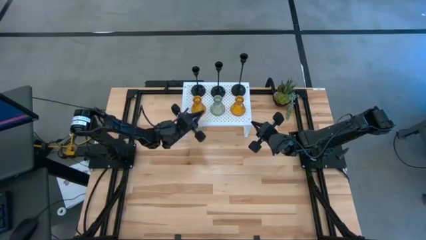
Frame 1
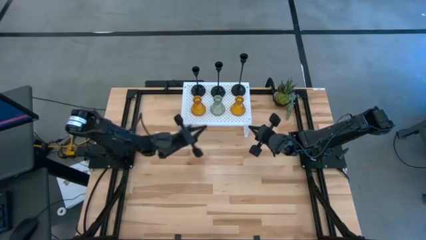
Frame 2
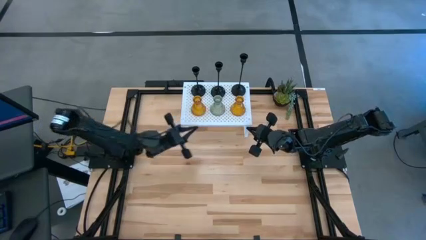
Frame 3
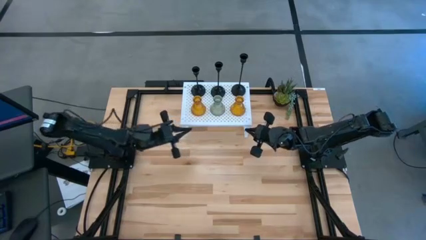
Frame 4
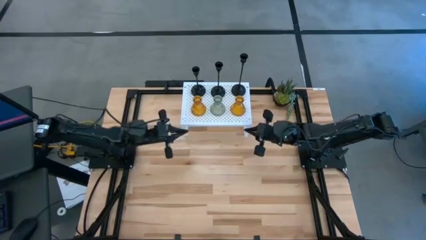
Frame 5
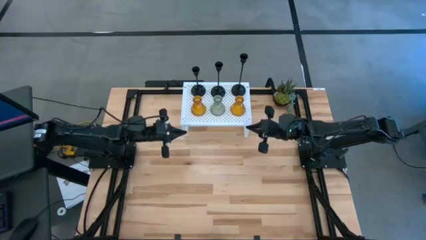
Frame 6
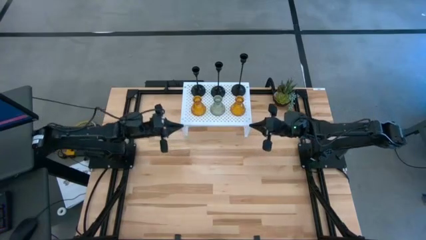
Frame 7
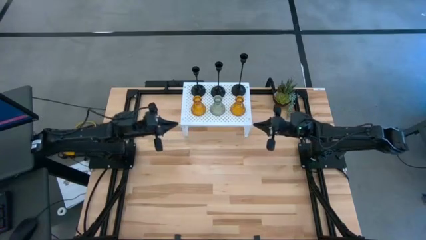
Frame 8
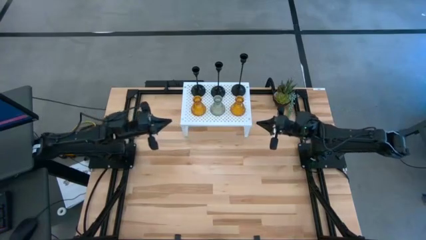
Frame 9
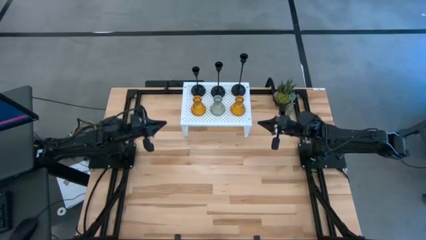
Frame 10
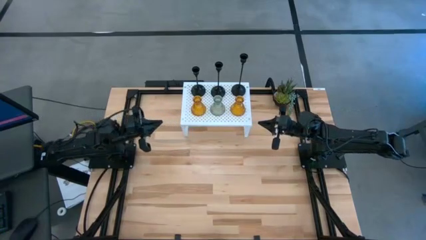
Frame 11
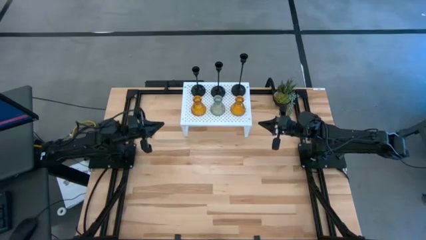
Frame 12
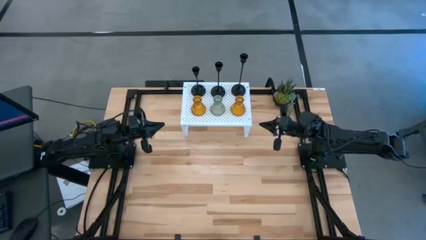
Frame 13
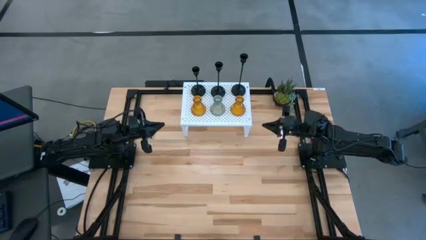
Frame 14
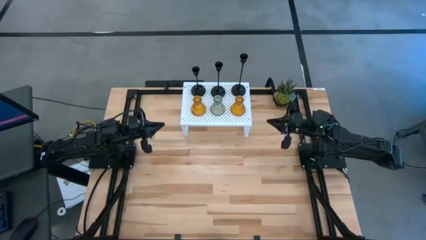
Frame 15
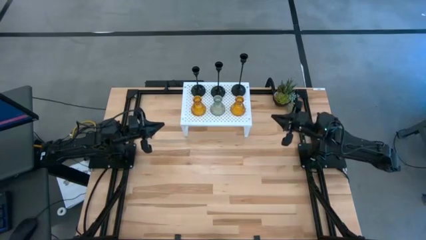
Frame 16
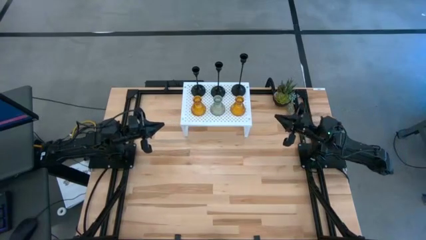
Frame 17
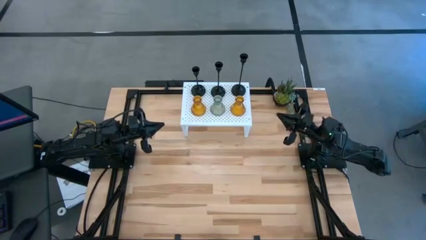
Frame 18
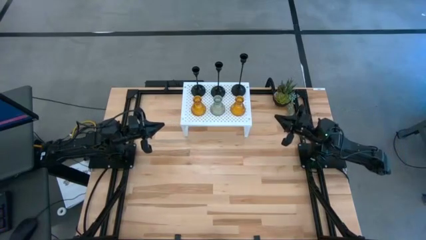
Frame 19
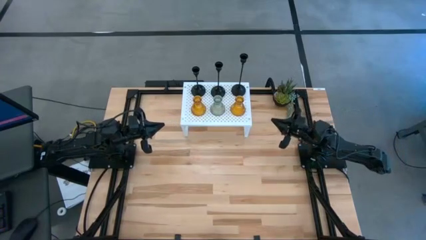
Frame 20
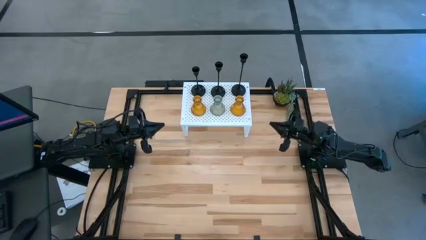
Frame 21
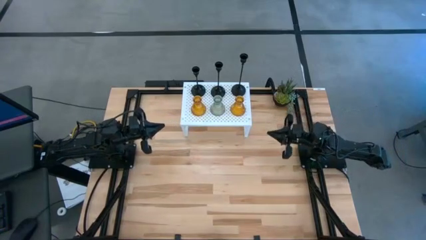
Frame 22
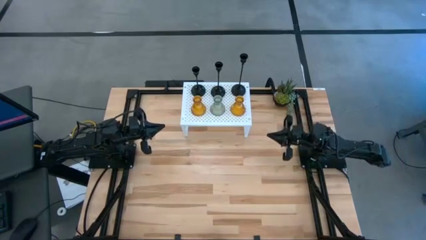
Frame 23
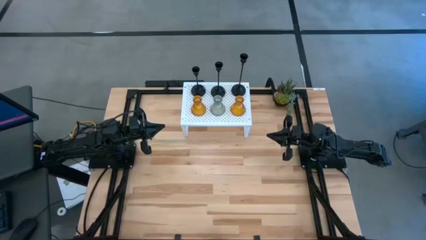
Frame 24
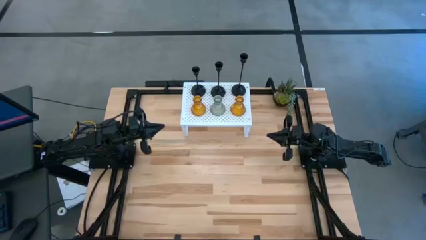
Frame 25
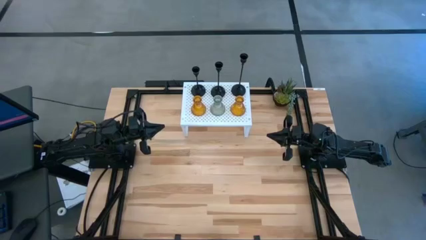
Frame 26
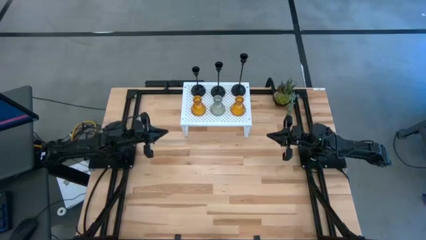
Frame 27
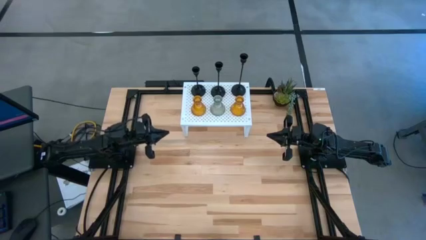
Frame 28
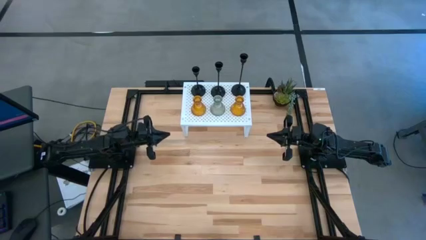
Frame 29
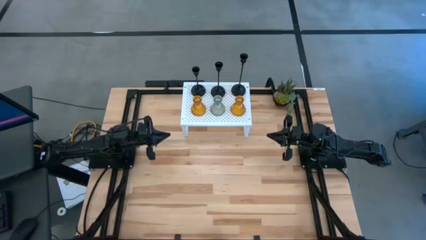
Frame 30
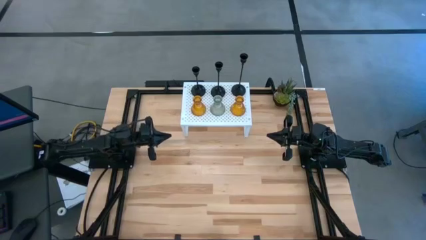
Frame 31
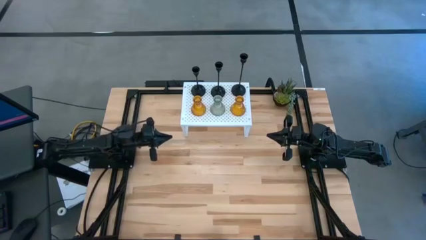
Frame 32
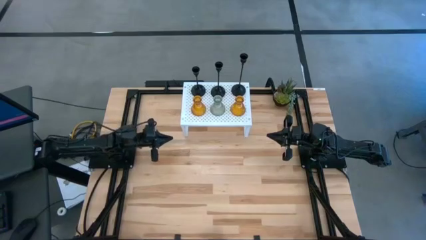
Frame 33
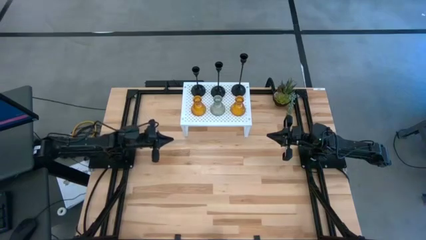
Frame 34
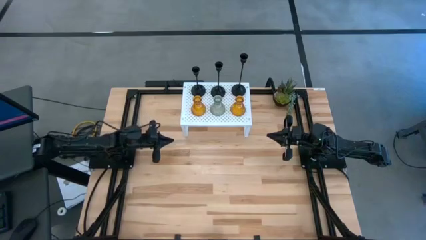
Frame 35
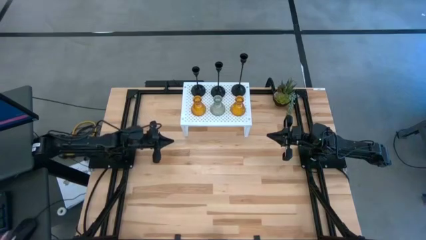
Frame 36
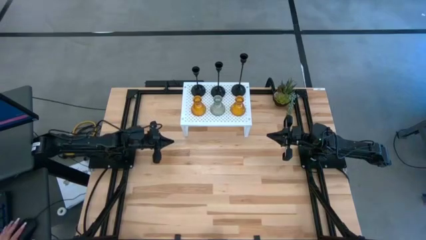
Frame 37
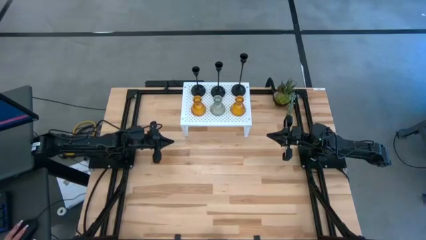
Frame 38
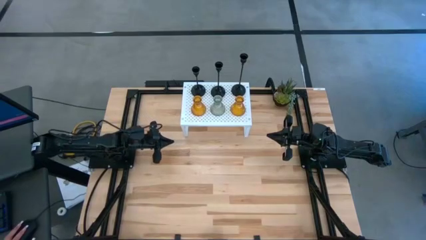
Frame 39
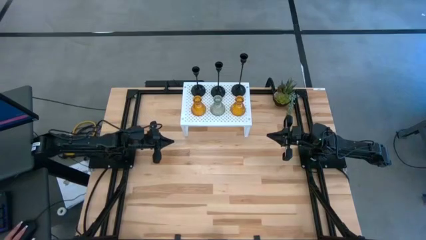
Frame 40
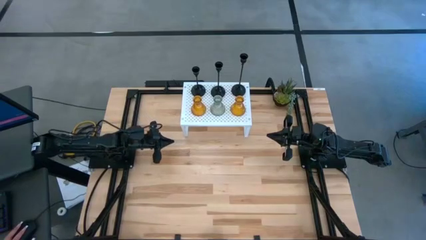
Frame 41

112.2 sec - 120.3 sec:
Task: Pick & Place candle stick holders
Return to Home Position

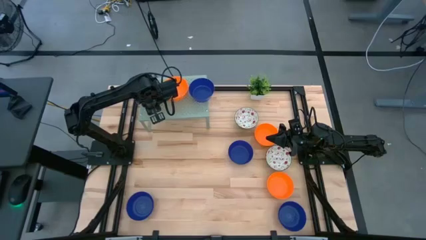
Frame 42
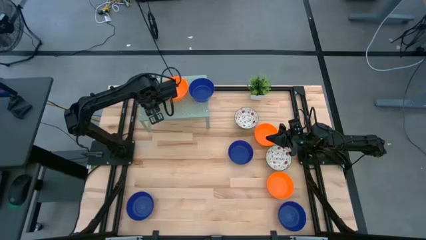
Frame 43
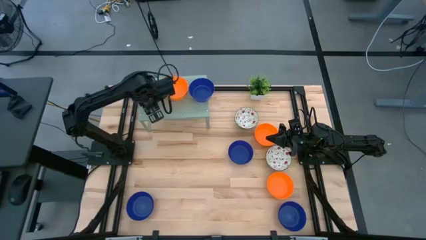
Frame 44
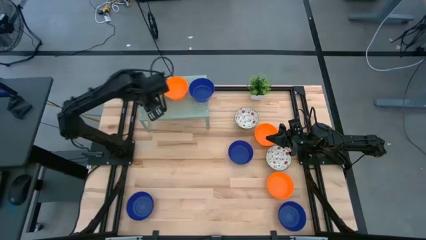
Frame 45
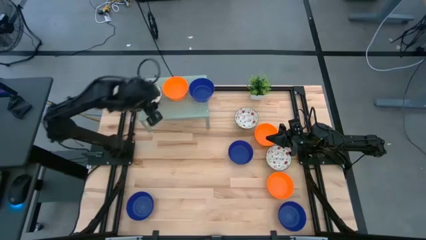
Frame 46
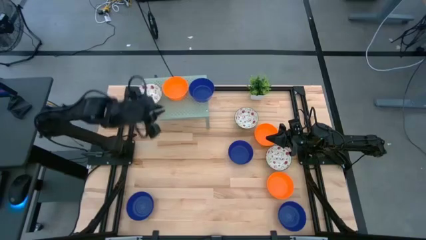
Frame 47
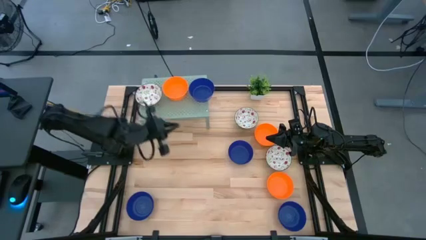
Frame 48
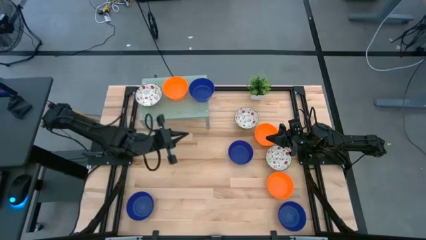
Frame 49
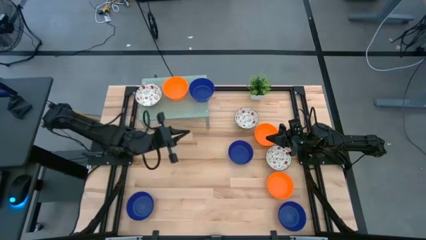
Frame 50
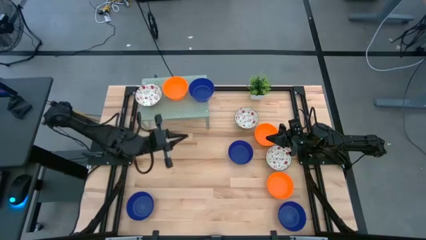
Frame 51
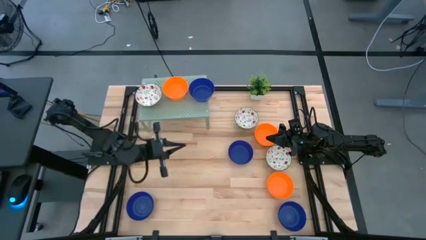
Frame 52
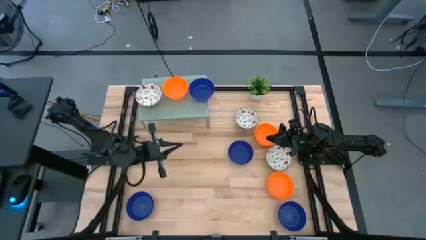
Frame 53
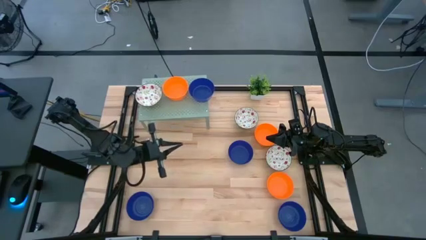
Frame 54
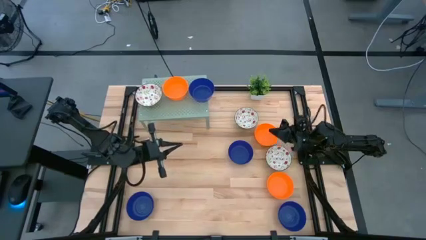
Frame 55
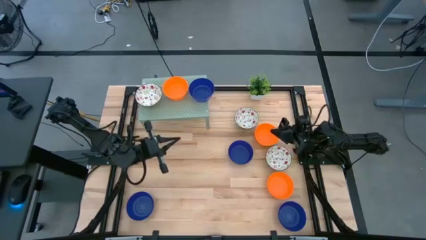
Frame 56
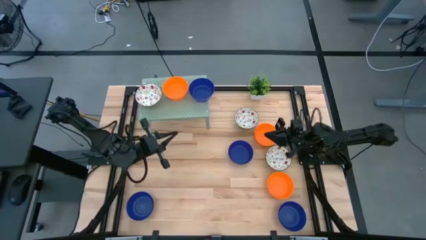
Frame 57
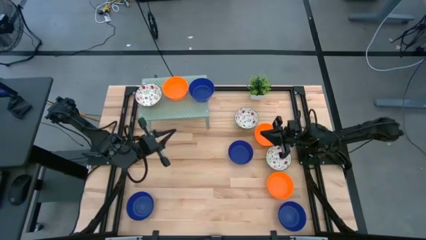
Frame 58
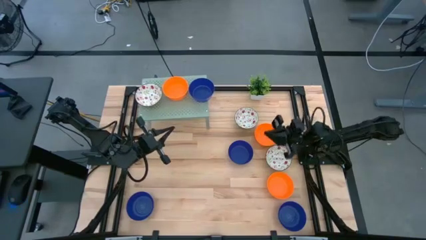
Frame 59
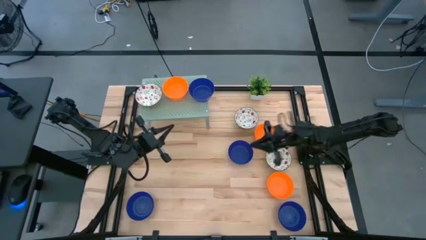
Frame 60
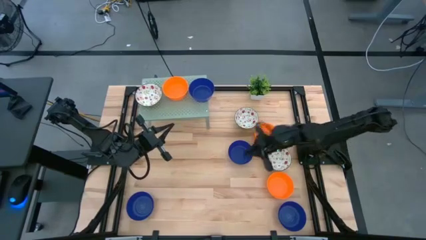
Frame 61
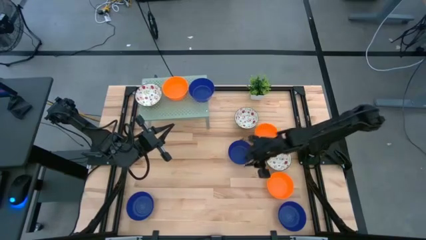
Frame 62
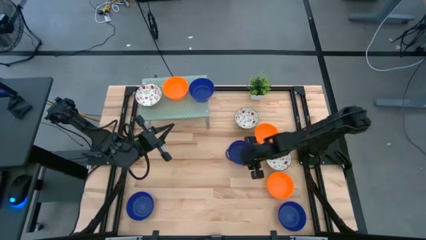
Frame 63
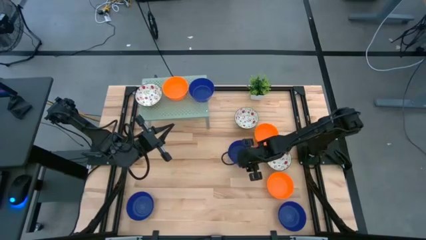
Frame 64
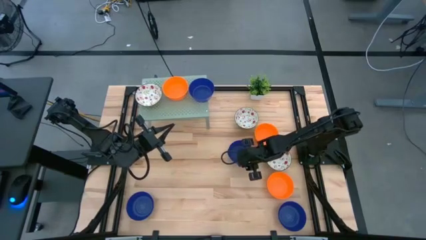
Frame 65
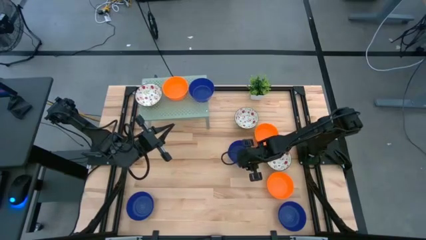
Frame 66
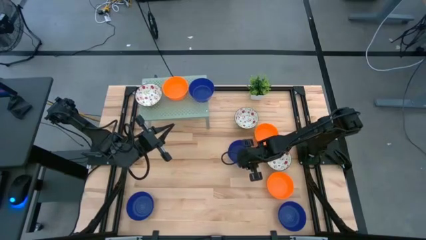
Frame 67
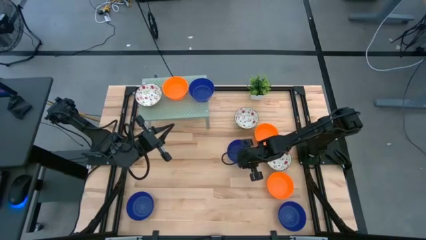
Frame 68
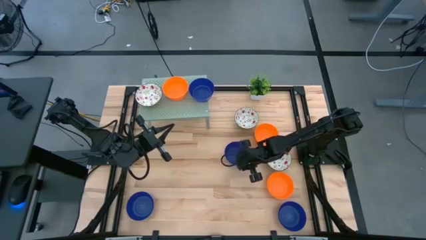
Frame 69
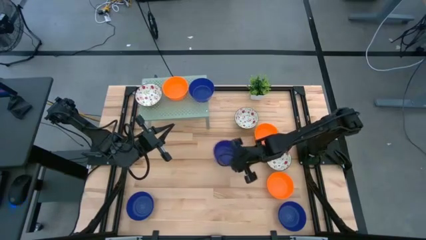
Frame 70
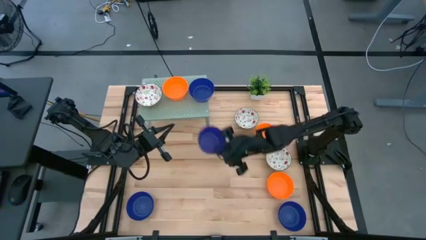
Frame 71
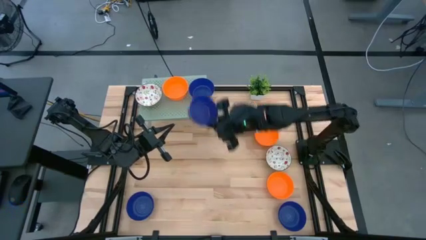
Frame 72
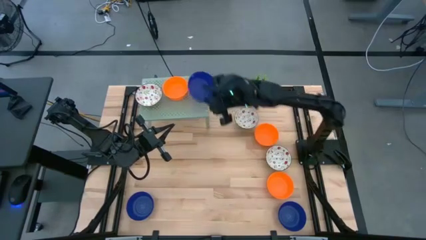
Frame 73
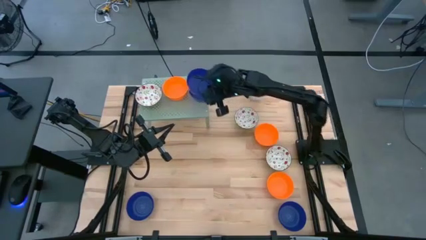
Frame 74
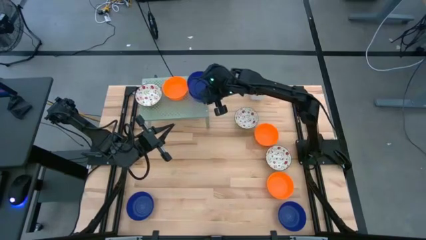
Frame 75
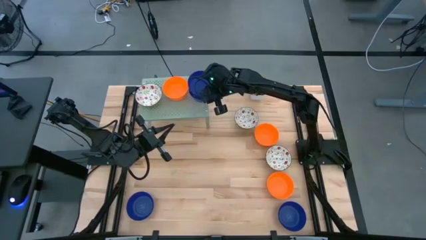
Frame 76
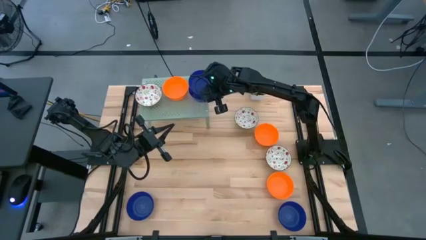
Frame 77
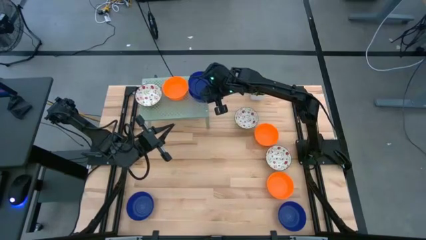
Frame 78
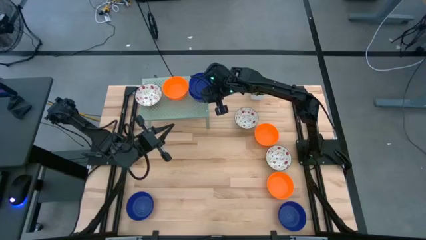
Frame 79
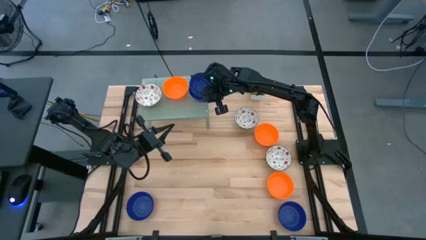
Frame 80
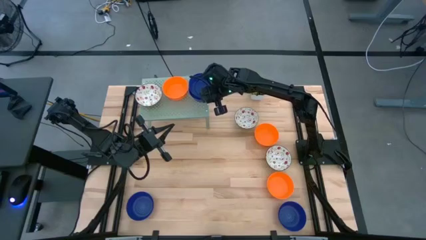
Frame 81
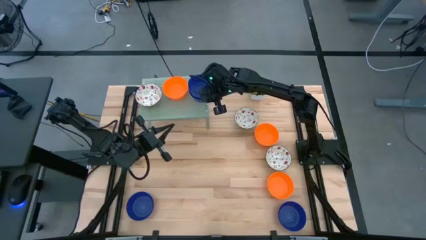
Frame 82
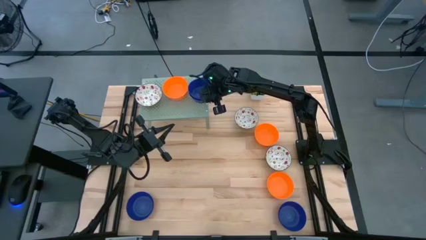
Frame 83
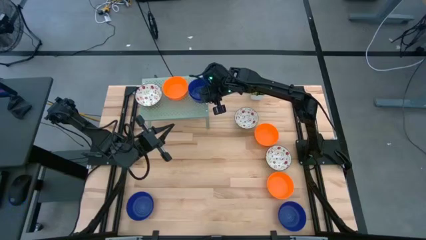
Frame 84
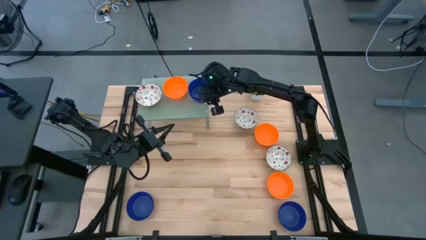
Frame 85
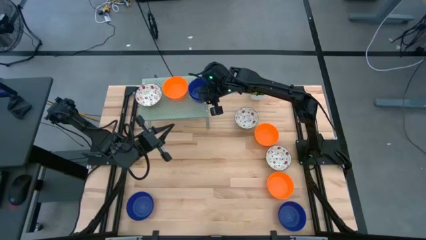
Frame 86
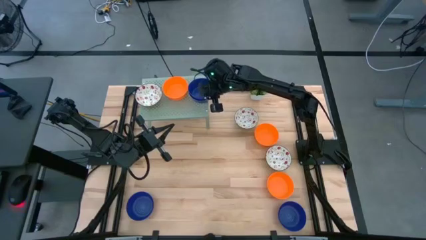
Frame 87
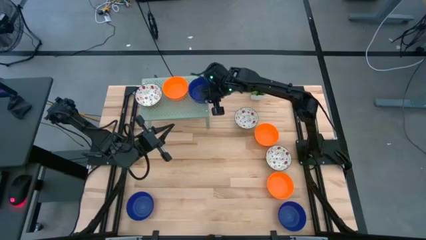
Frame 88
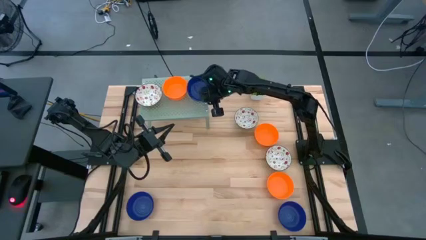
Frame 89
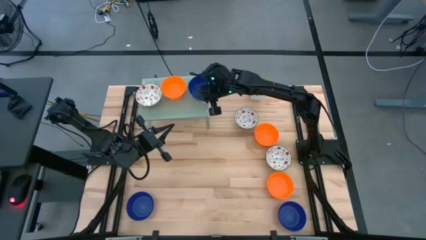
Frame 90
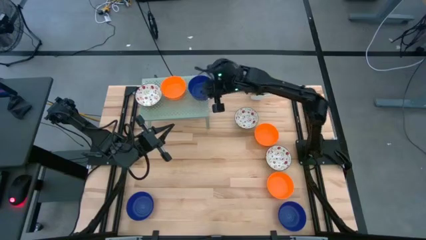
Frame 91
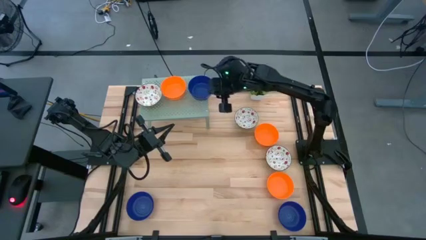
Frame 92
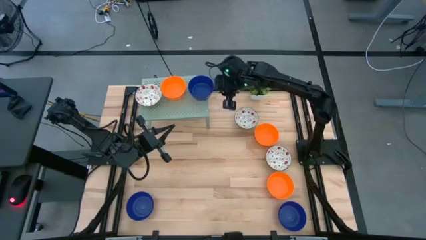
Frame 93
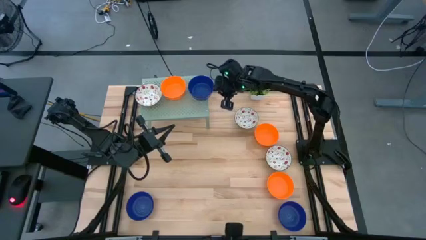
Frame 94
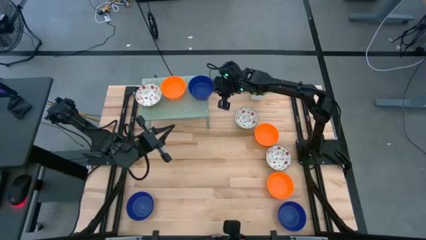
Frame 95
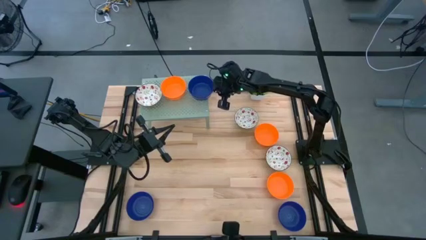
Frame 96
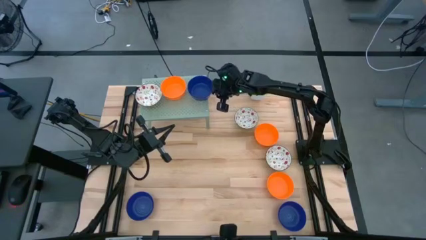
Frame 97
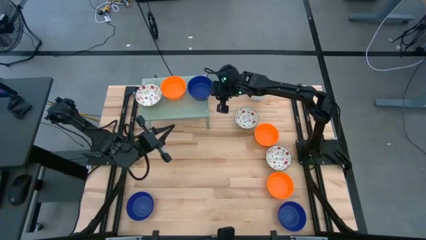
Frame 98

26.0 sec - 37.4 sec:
Task: Pick & Place Mini bowls
Stack the blue bowl on top of the other blue bowl on the shelf
